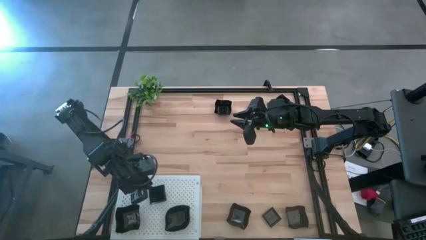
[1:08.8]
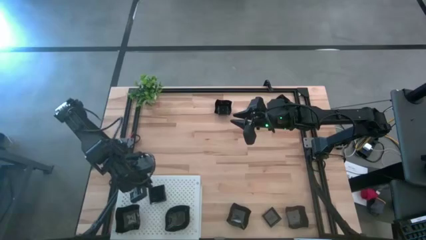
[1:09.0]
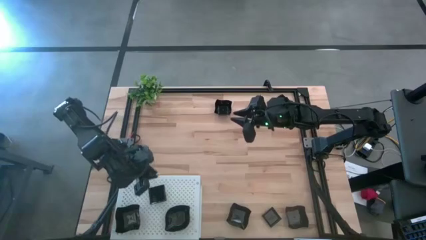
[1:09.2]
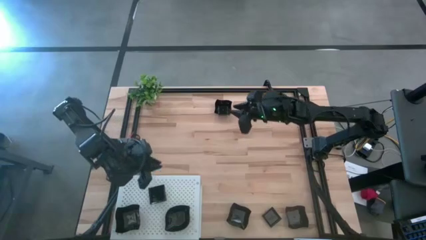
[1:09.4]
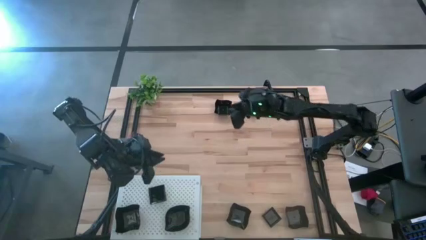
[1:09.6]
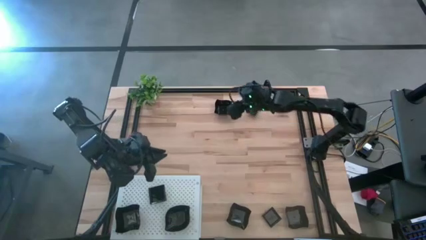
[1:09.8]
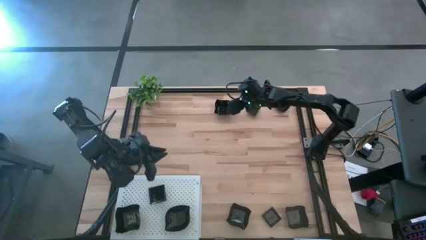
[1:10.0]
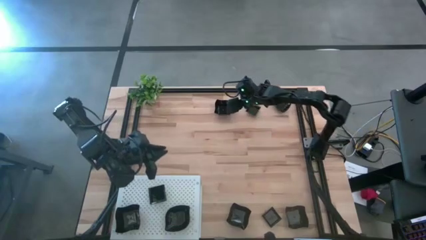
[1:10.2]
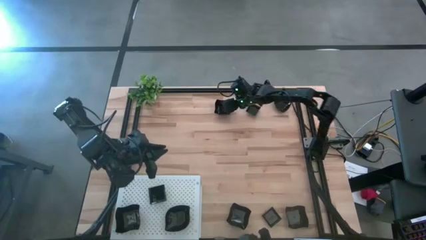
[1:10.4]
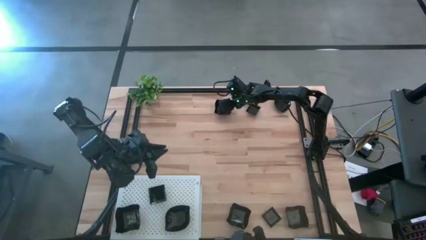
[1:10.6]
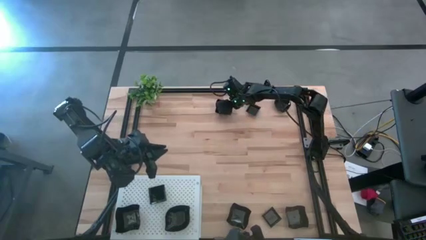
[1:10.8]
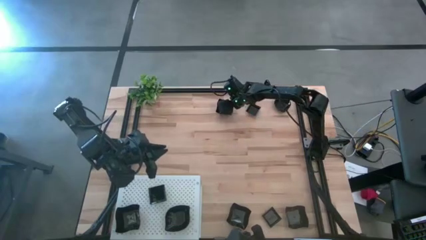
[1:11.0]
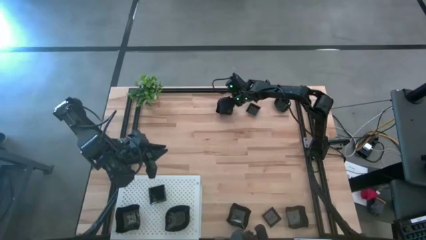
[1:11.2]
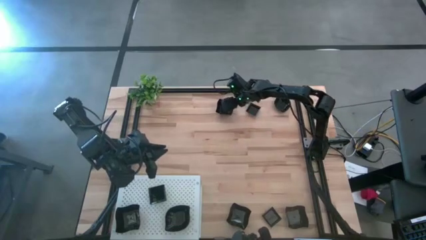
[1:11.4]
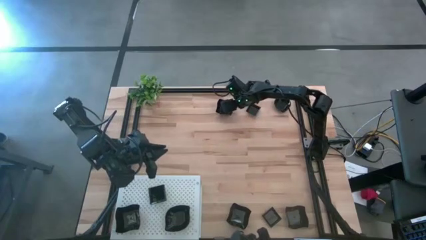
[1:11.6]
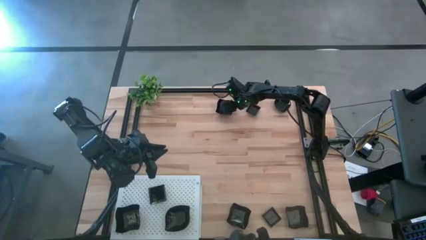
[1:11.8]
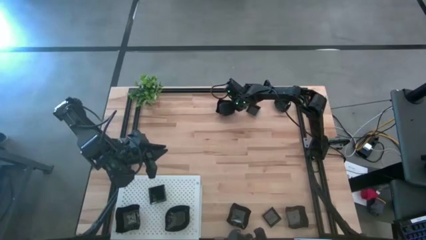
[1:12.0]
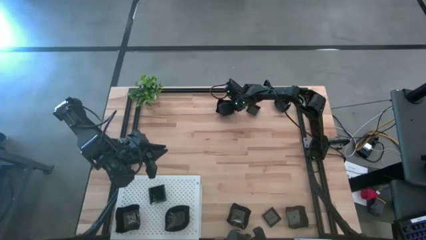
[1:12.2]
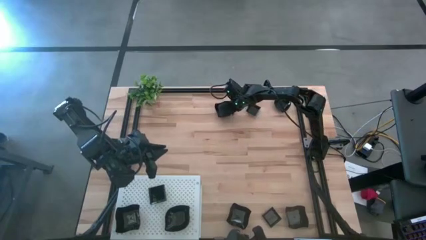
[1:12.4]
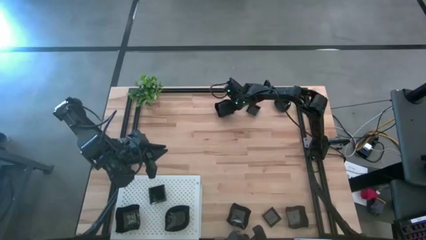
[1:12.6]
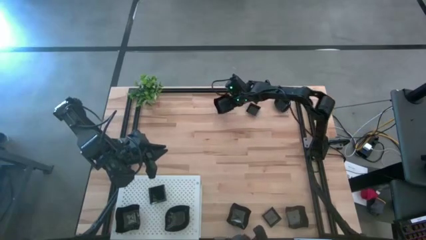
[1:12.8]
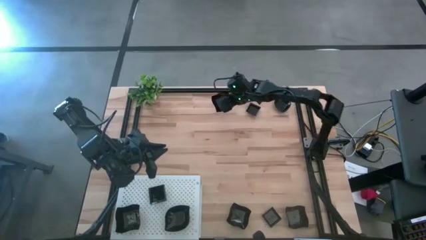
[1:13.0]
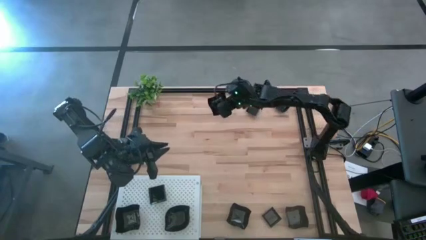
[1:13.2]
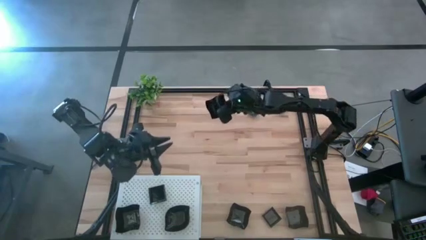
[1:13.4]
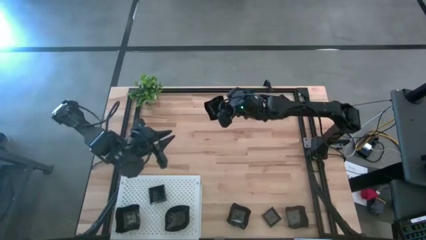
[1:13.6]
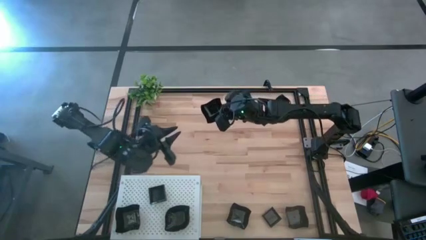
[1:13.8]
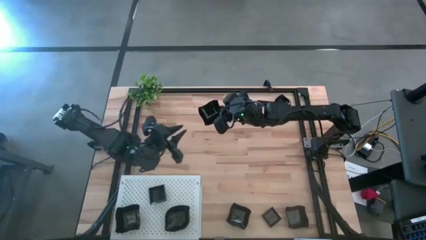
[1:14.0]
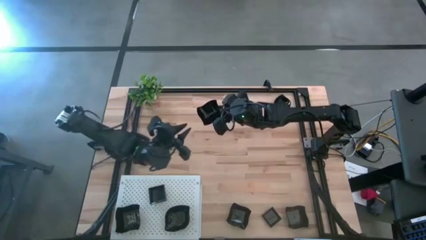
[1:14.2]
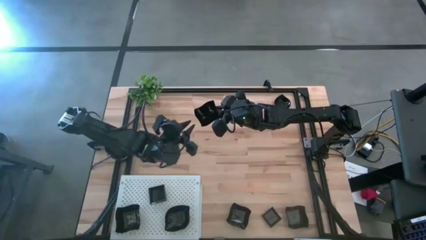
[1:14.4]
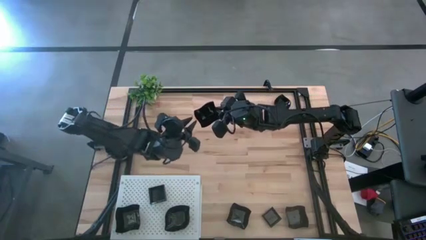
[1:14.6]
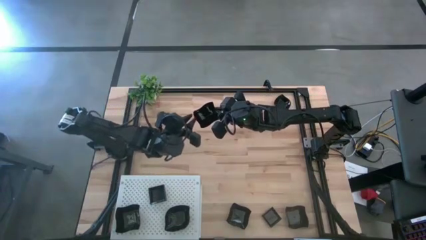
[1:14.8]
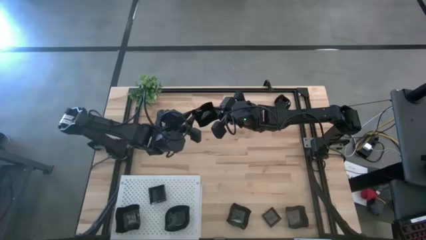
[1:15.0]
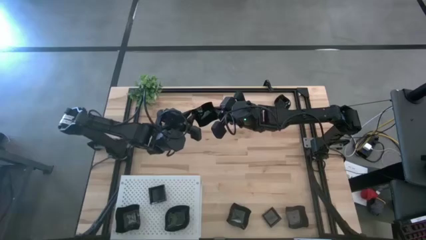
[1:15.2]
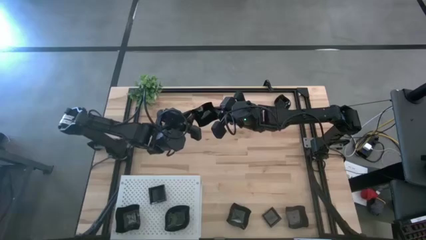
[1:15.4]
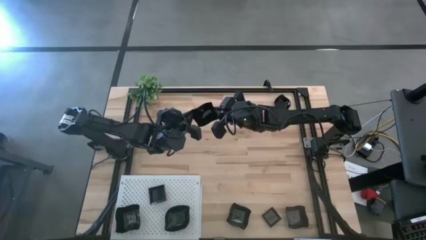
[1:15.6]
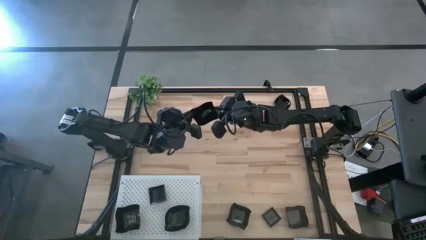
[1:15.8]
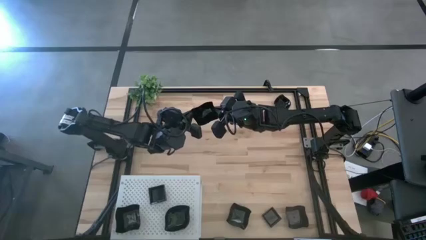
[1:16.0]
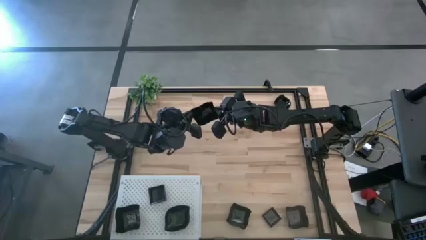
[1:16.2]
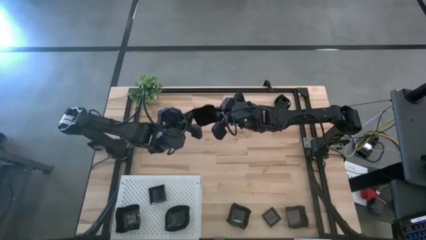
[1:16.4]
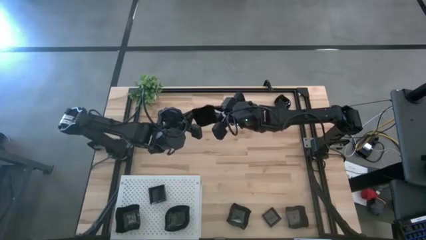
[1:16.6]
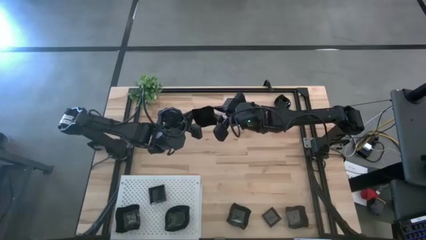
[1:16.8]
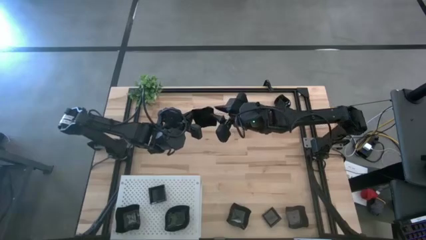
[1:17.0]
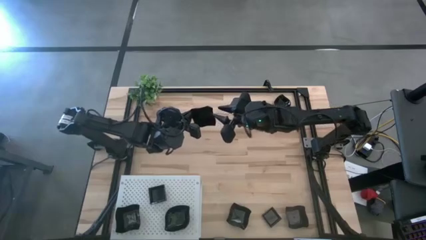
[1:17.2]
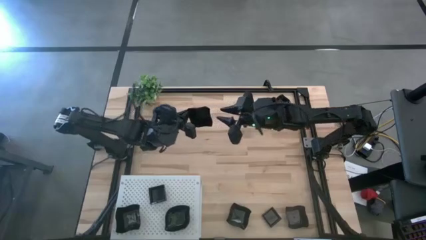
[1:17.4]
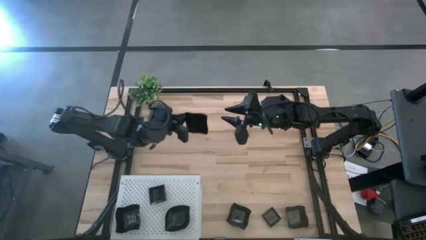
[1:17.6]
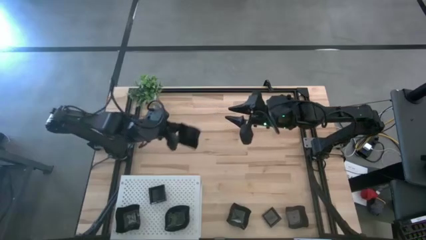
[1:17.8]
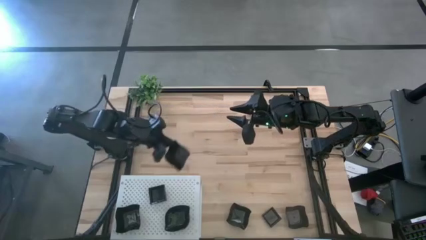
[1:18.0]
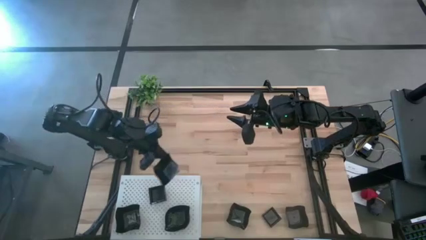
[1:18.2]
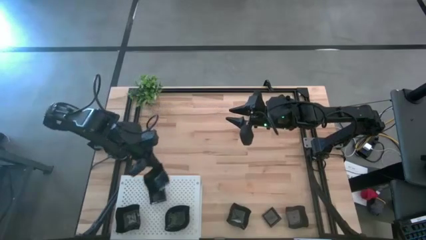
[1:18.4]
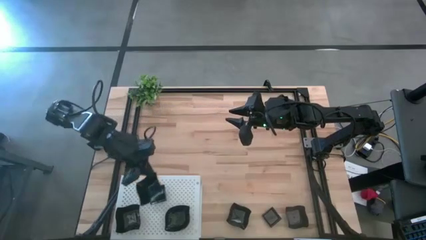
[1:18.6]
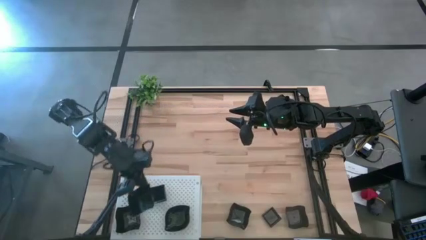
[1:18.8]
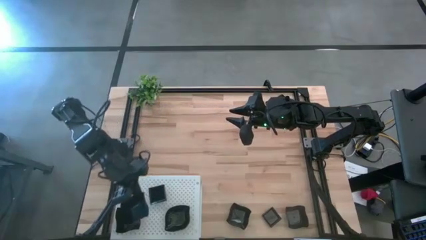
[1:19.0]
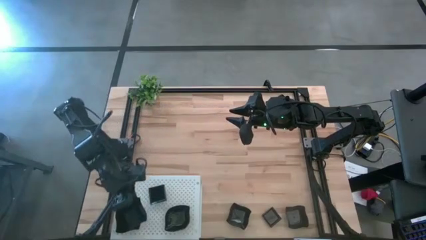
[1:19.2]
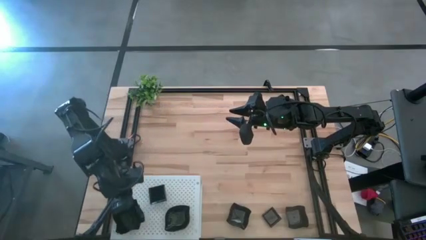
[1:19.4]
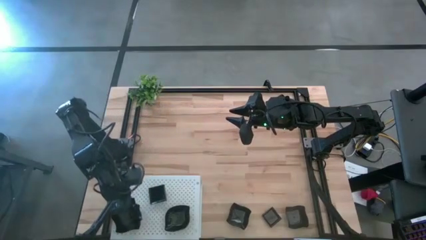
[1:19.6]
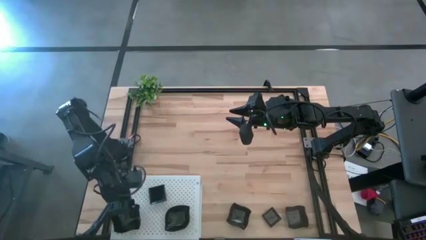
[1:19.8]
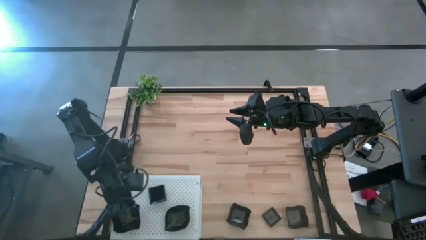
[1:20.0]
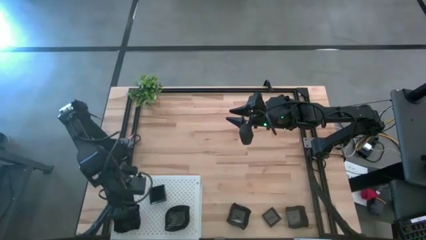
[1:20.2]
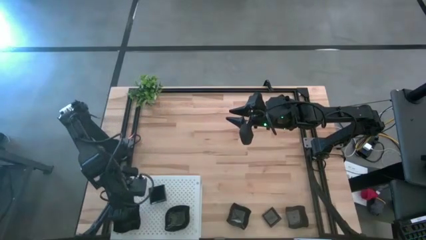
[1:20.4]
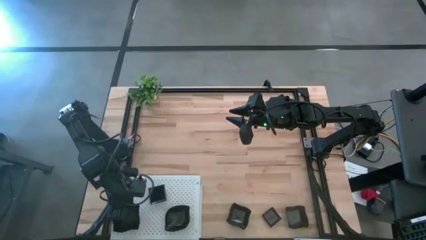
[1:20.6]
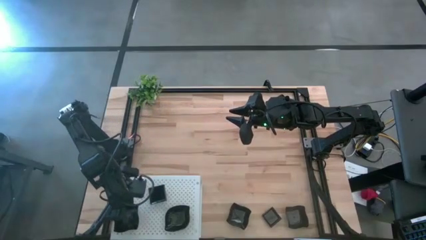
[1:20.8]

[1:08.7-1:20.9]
Task: Pick & Place Mini shaped plates
Stack the distorted square plate on top of the distorted square plate on the shelf
